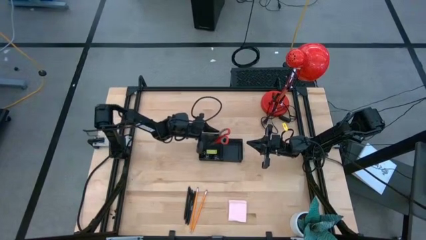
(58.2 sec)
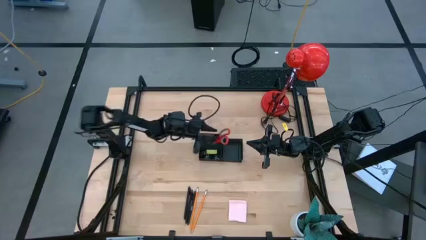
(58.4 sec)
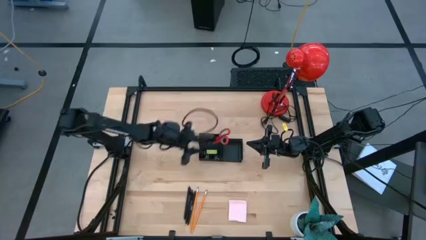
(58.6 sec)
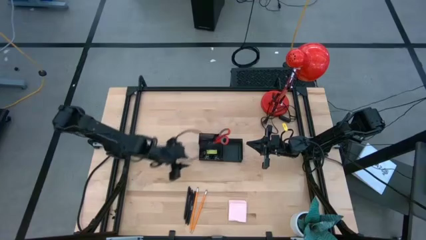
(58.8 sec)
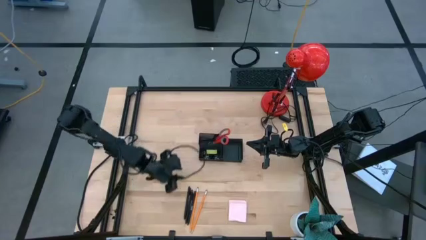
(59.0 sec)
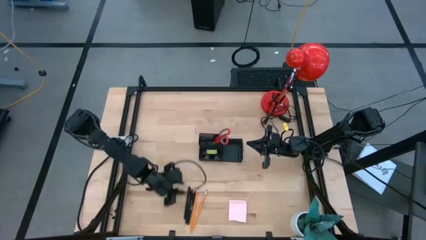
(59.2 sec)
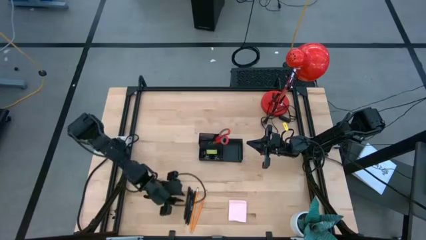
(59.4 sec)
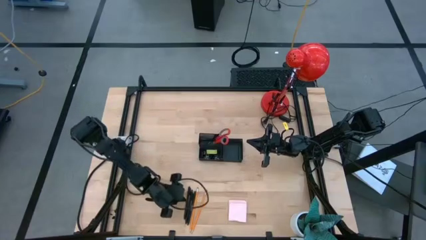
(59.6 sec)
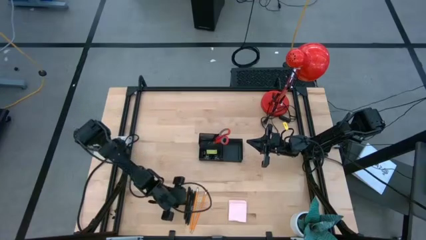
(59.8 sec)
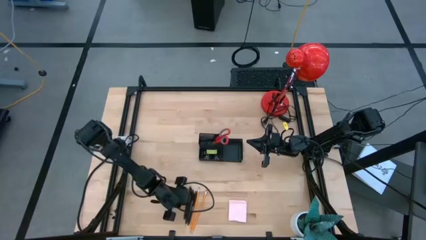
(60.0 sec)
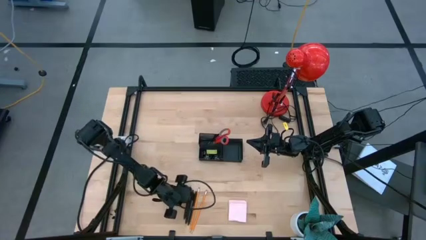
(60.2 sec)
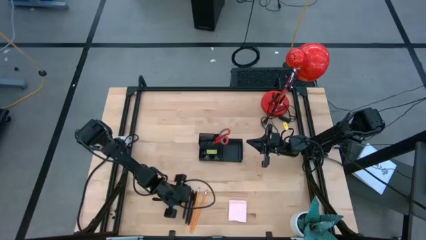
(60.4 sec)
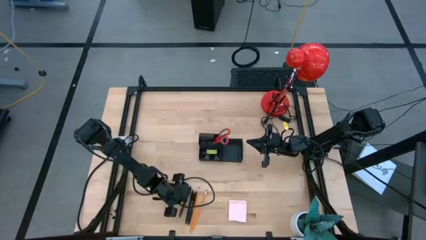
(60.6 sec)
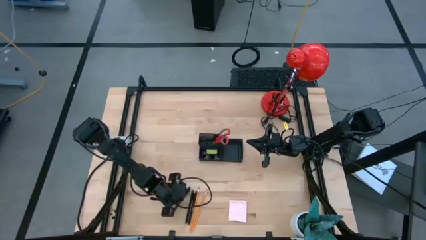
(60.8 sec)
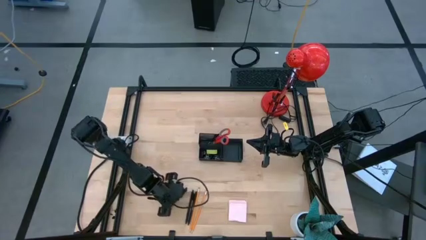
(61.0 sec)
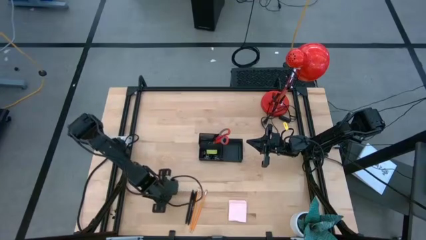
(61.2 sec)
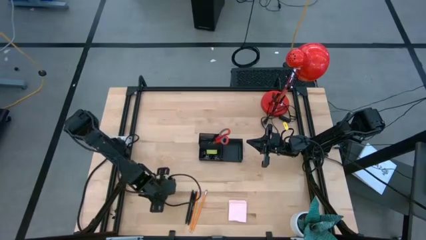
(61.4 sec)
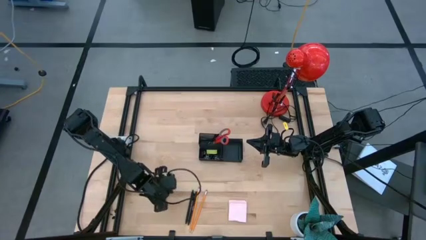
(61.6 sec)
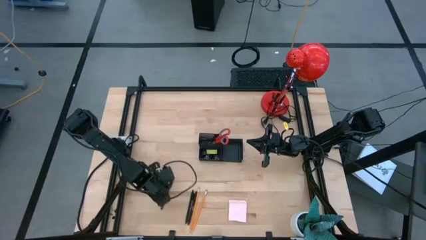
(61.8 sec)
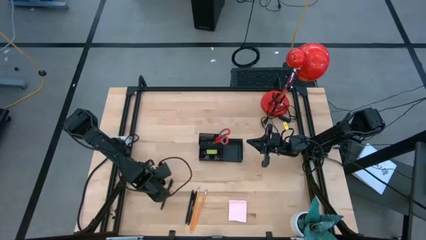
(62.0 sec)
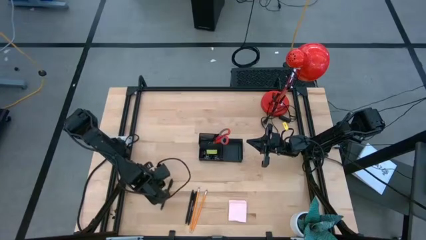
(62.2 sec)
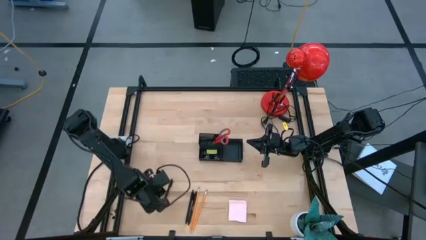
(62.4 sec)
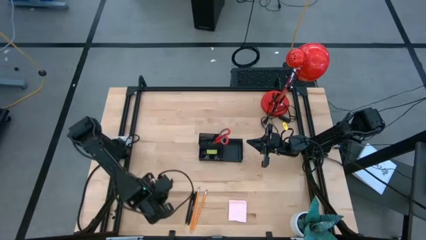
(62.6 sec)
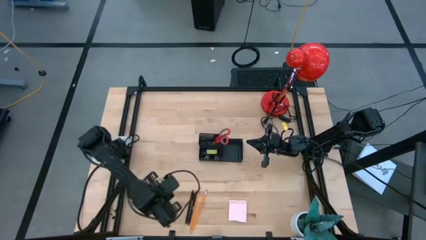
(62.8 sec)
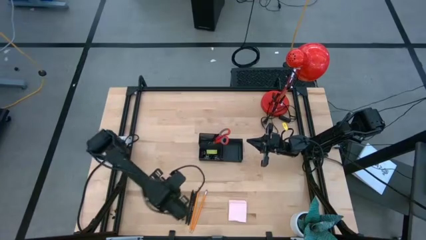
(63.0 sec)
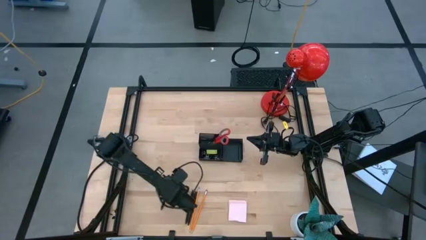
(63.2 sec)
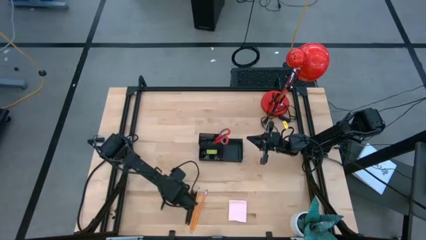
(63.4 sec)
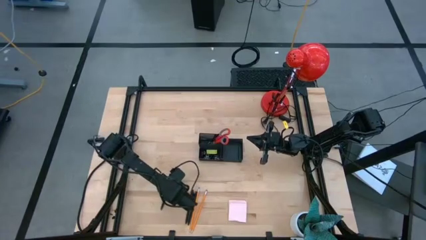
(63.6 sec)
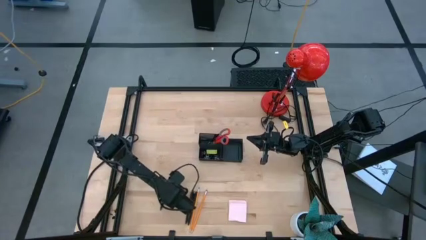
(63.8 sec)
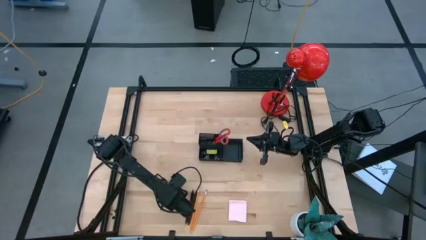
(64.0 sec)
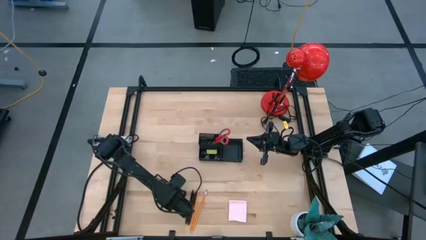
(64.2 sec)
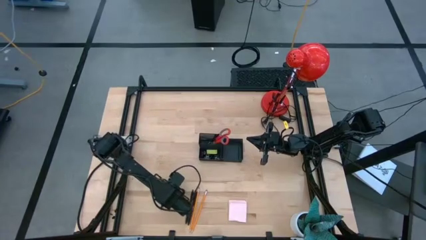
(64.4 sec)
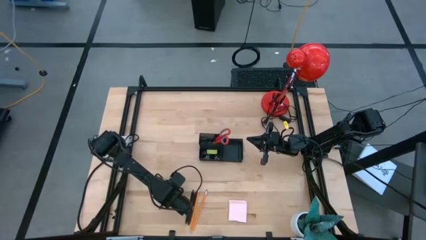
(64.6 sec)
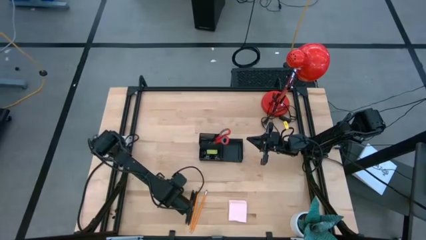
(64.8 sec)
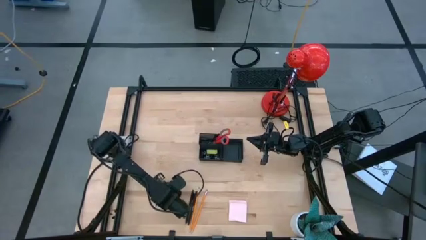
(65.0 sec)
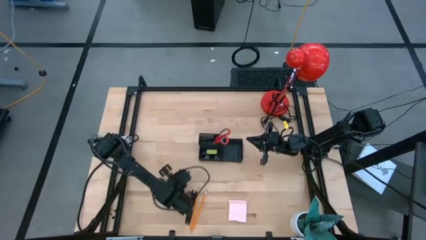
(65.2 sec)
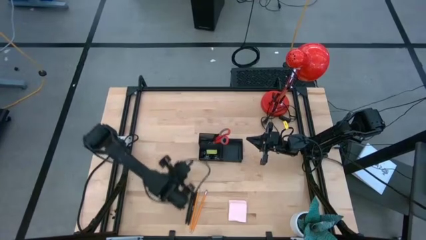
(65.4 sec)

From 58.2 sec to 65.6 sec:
Task: Pick and place office supplies into organizer
Put the black pen into the black desk organizer

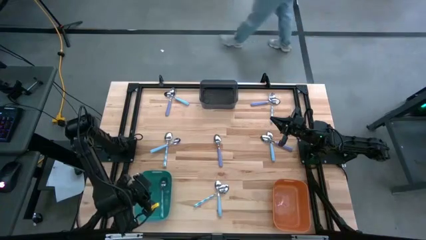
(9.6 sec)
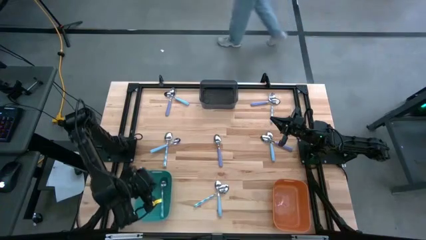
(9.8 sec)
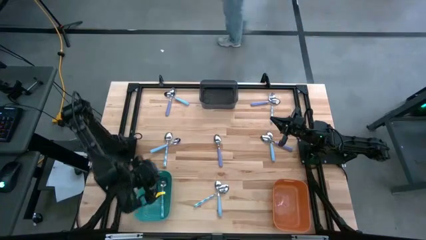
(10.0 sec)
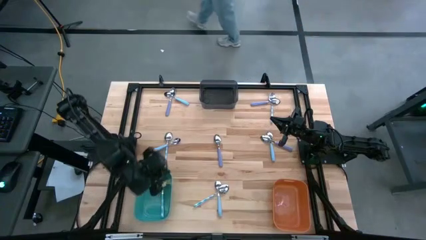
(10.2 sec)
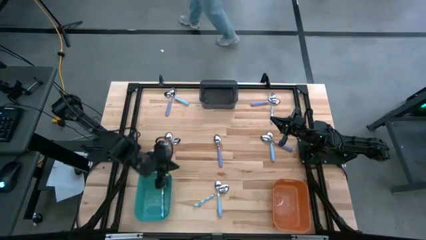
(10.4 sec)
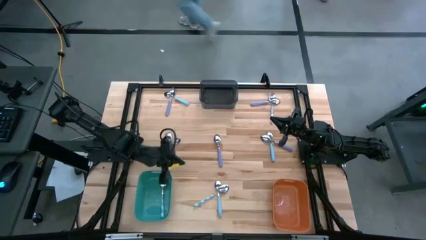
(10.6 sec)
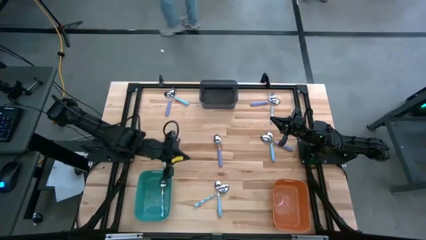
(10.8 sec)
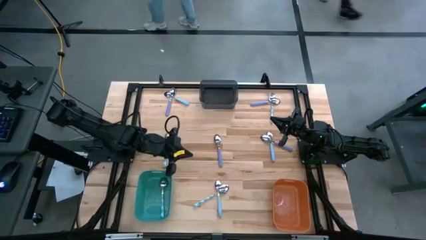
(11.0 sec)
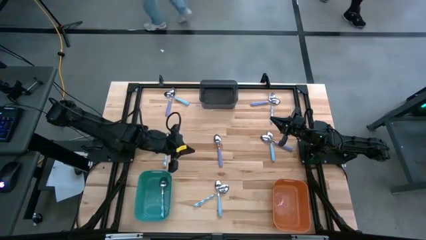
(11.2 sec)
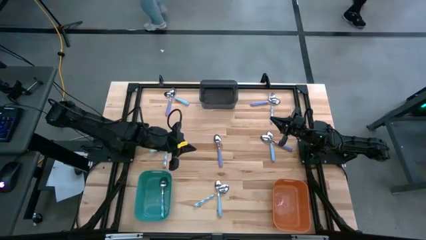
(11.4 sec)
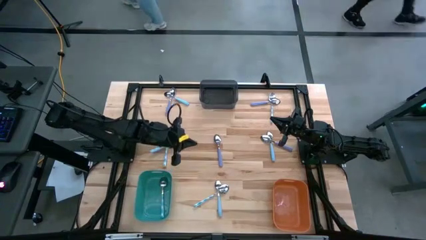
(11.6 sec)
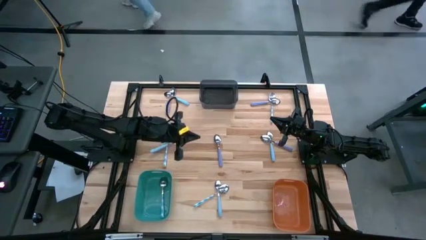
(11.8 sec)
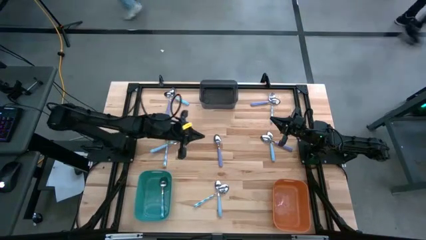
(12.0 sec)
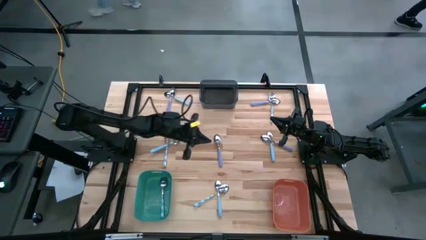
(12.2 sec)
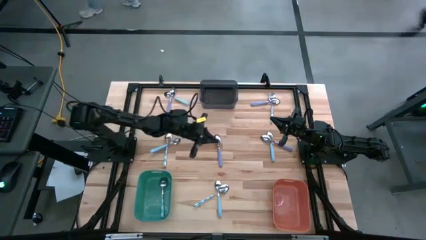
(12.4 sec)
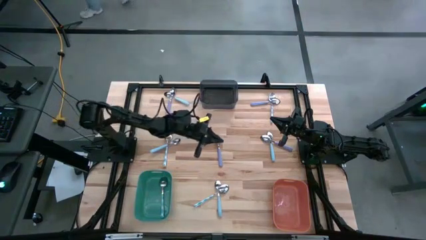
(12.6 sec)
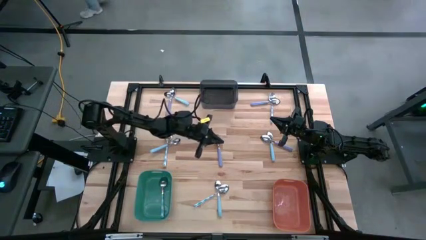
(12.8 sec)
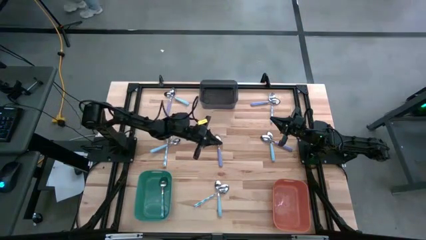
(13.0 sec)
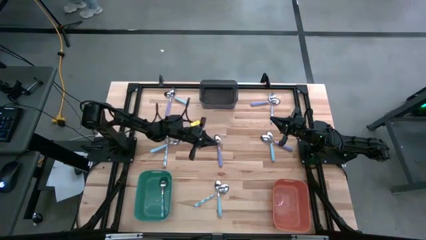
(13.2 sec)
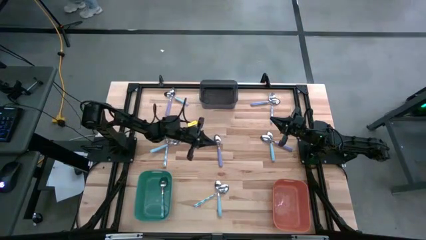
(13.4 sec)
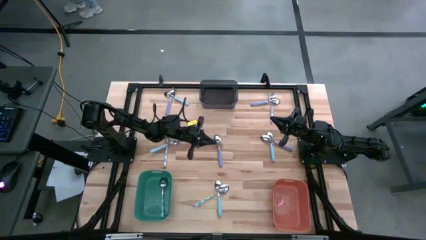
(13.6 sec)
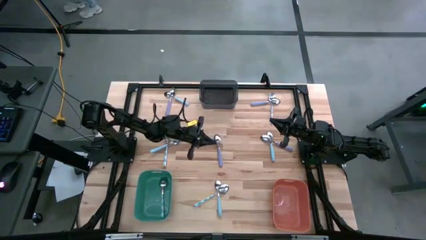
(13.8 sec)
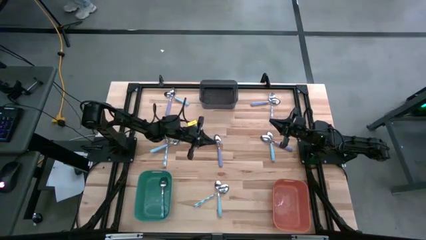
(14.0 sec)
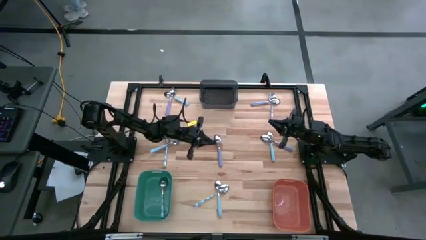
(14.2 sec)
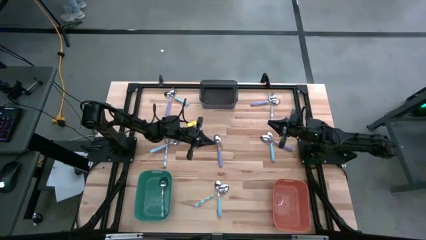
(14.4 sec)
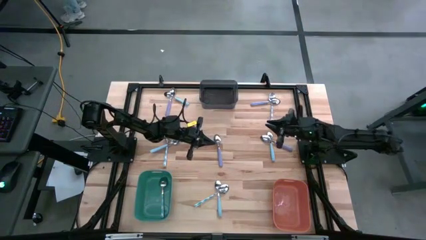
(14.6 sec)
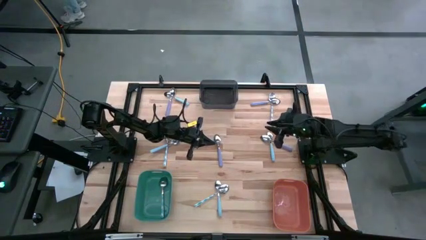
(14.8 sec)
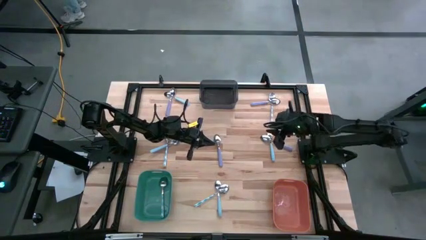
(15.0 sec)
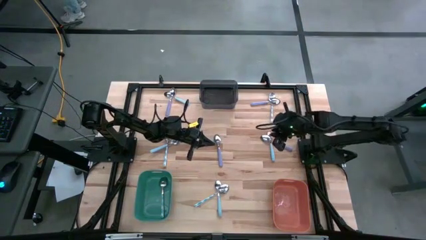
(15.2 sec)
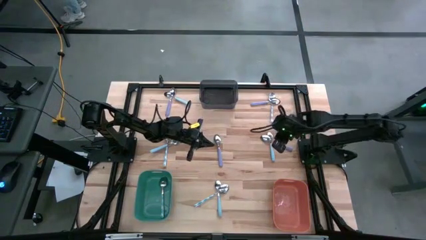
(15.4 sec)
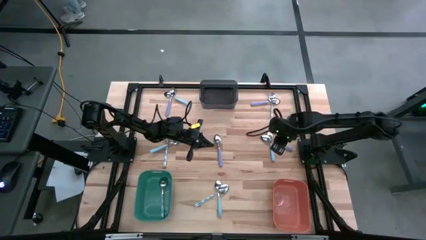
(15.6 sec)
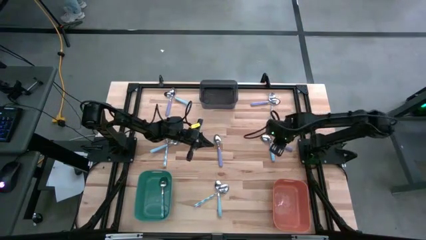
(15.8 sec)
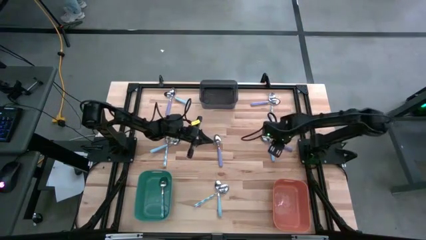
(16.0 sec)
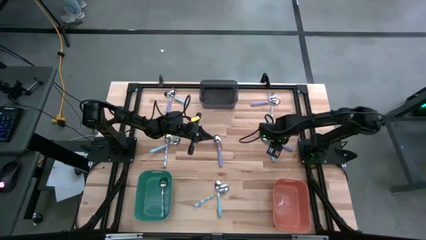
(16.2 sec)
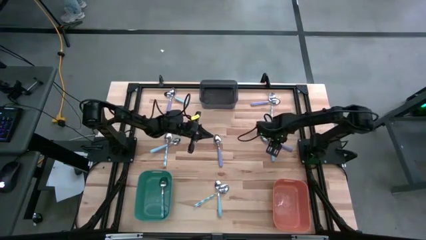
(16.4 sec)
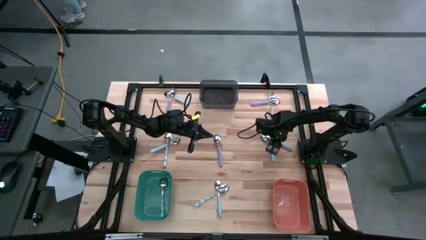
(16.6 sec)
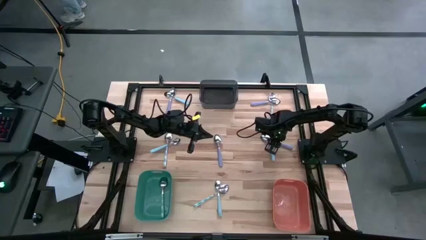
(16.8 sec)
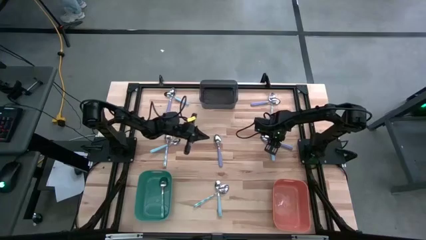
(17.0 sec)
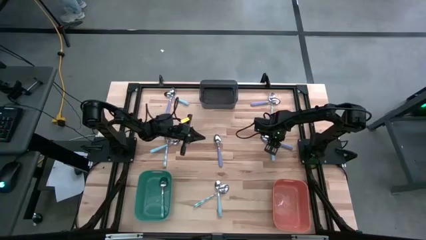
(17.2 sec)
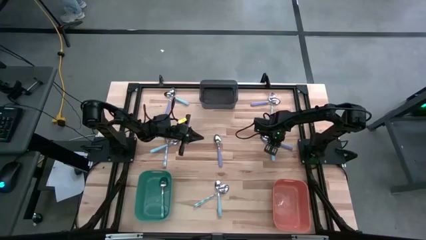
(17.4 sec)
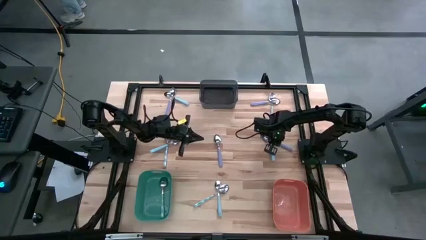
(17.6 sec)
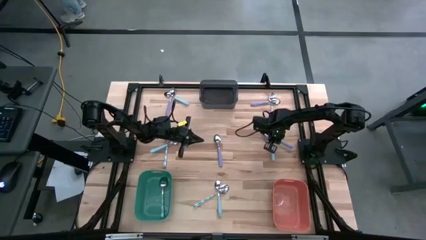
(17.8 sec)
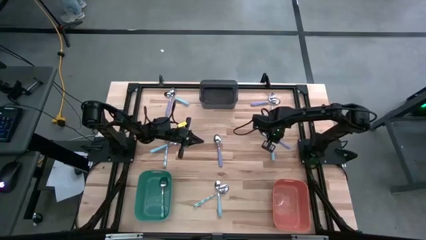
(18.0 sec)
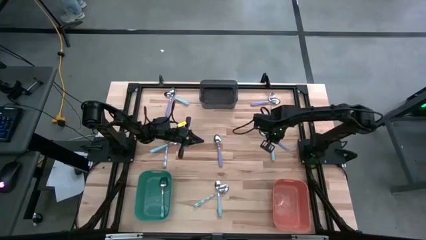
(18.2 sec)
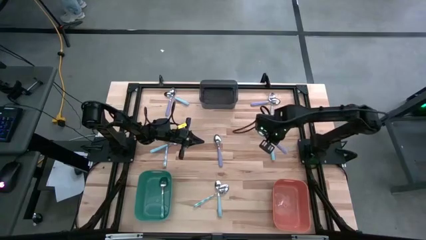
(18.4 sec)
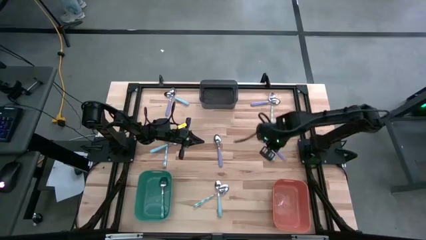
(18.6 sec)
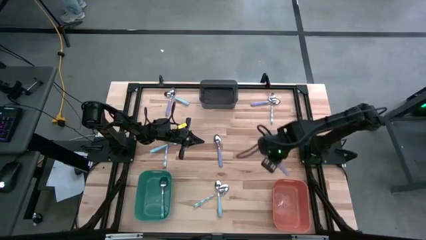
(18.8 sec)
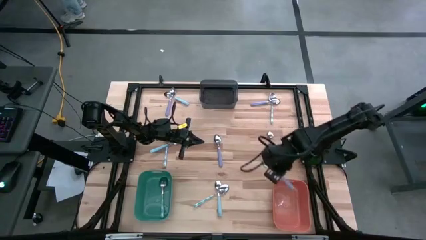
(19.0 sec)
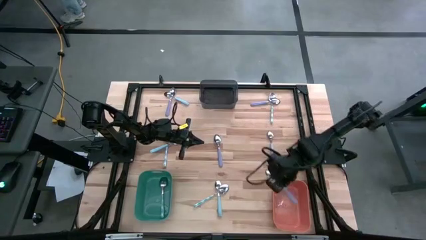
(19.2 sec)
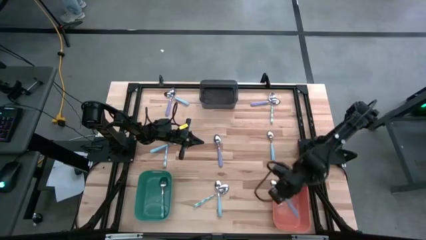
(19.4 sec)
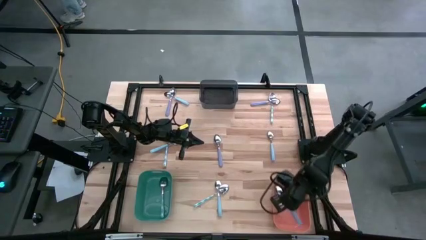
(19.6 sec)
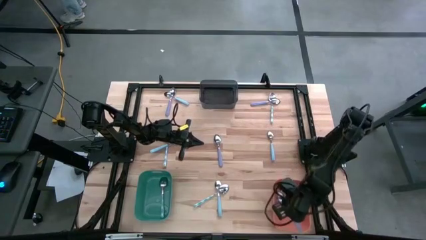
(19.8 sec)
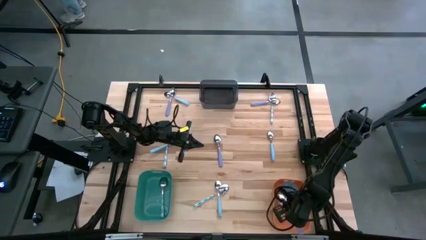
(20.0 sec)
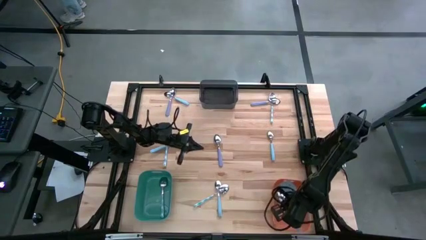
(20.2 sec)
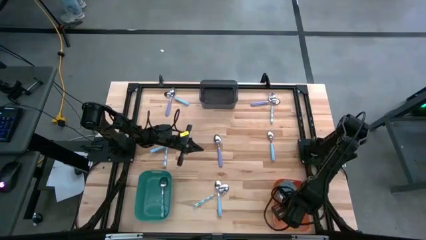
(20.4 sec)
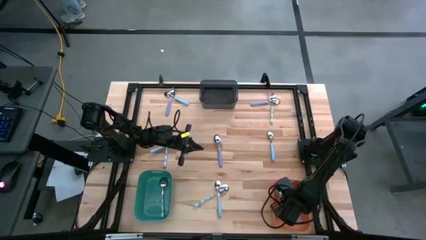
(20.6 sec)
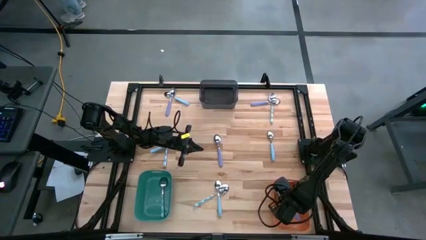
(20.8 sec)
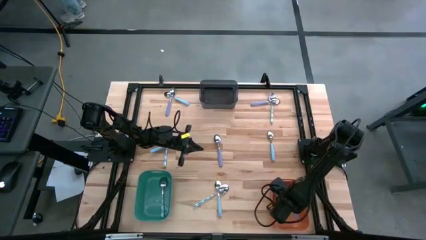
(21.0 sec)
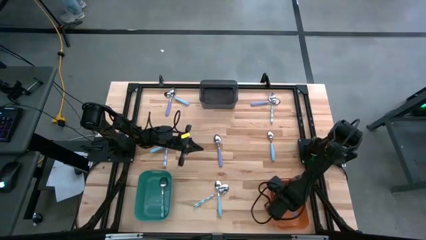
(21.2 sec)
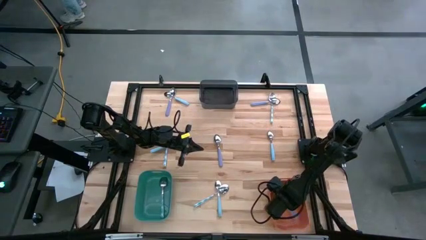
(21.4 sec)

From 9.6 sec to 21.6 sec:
Task: Sort silverware by color (type)
Put the purple spoon into the orange bin
